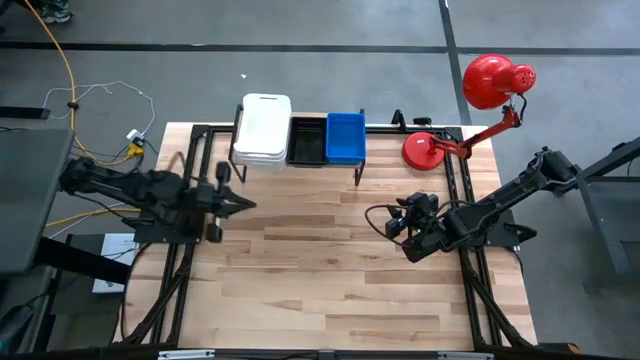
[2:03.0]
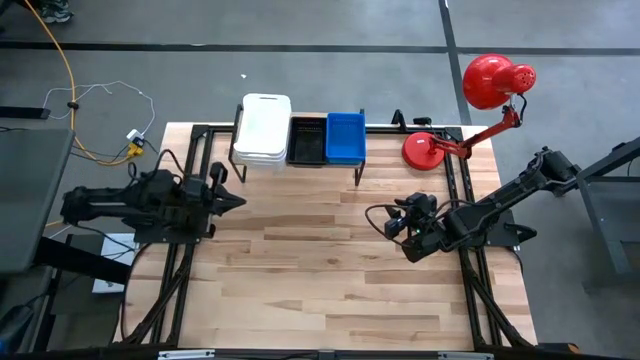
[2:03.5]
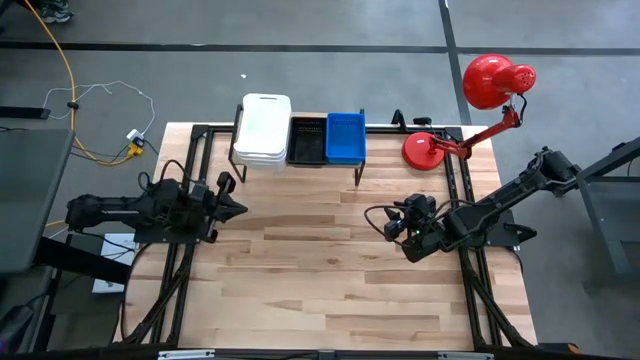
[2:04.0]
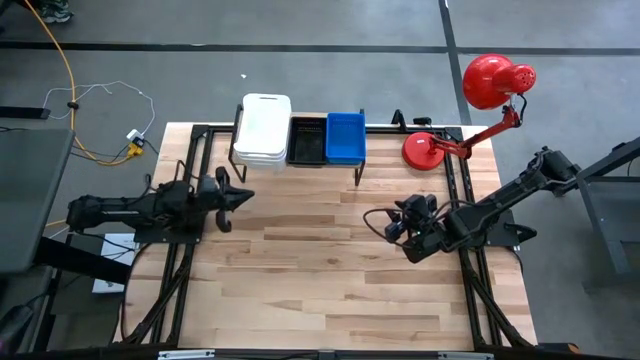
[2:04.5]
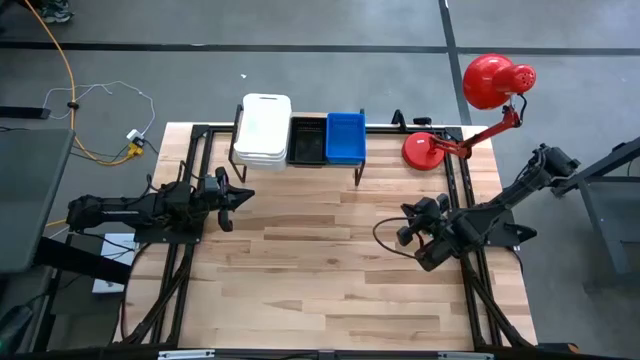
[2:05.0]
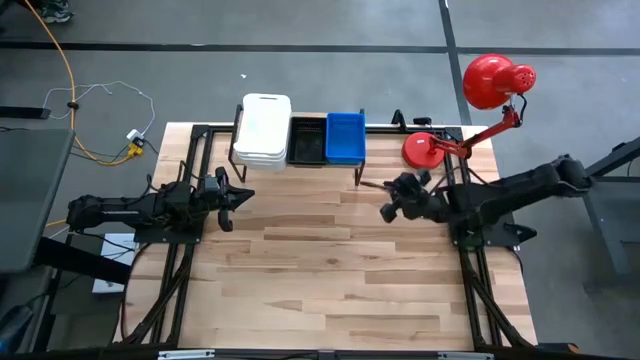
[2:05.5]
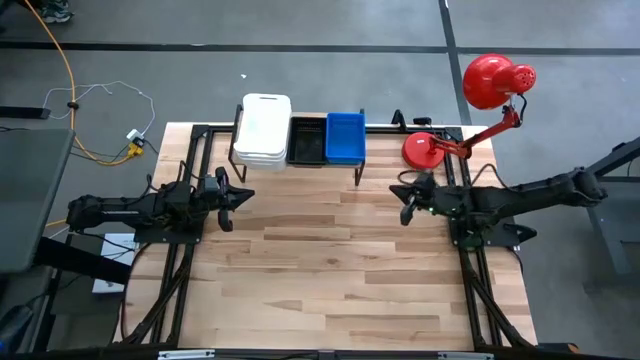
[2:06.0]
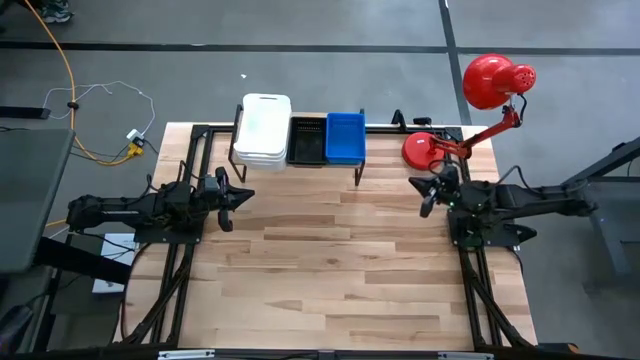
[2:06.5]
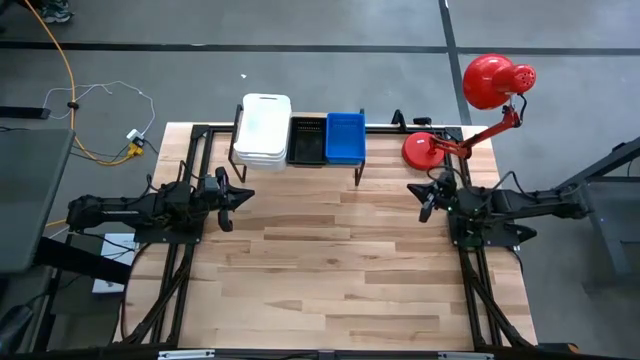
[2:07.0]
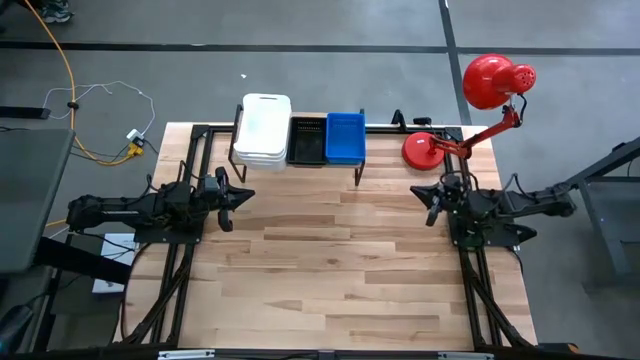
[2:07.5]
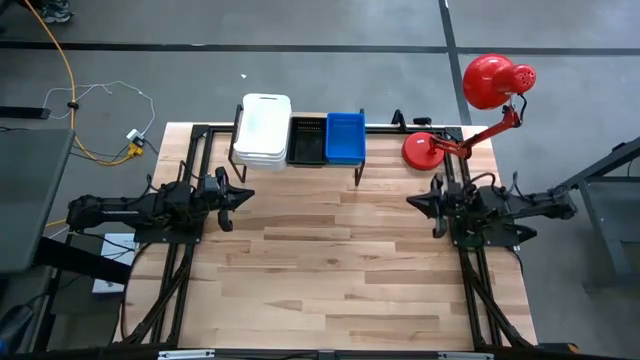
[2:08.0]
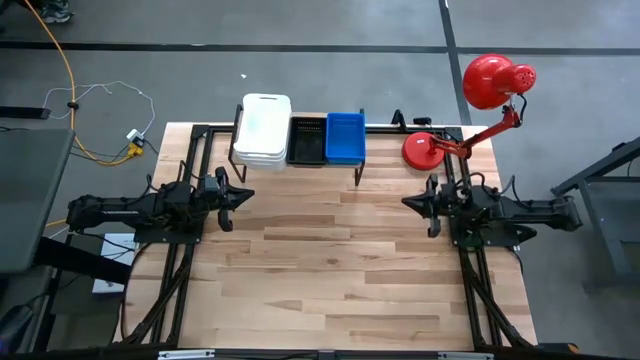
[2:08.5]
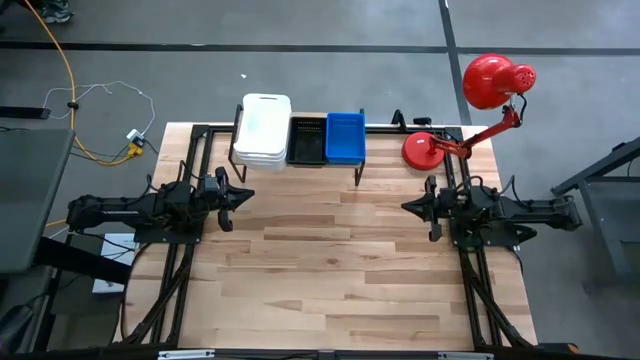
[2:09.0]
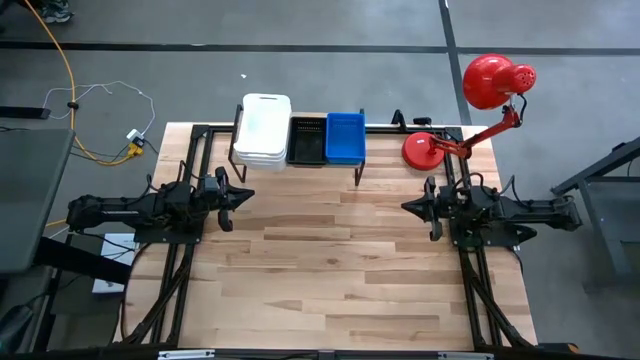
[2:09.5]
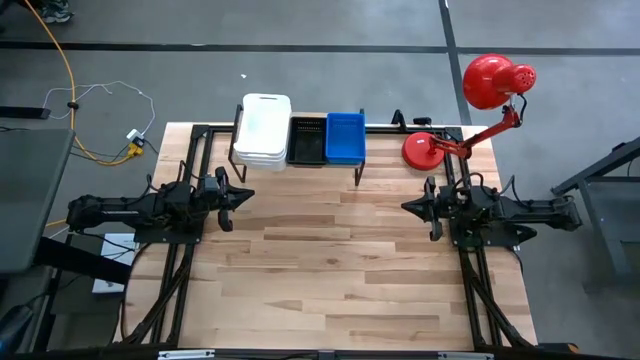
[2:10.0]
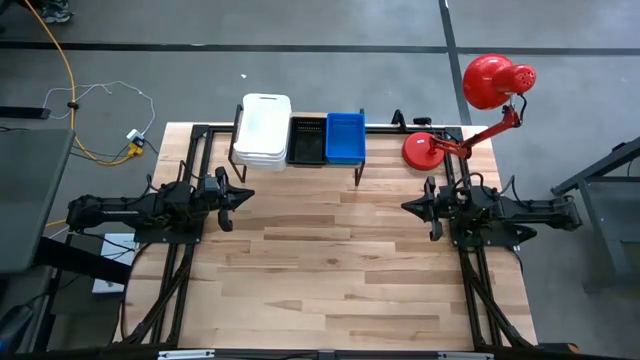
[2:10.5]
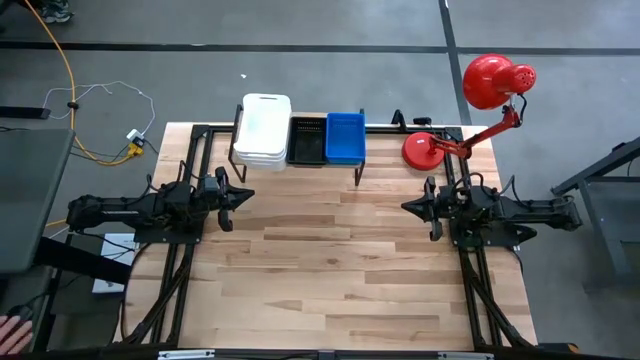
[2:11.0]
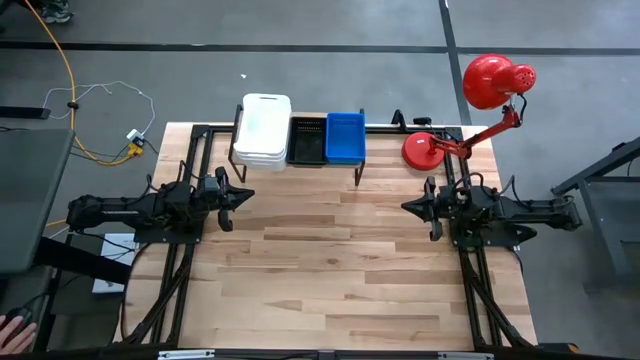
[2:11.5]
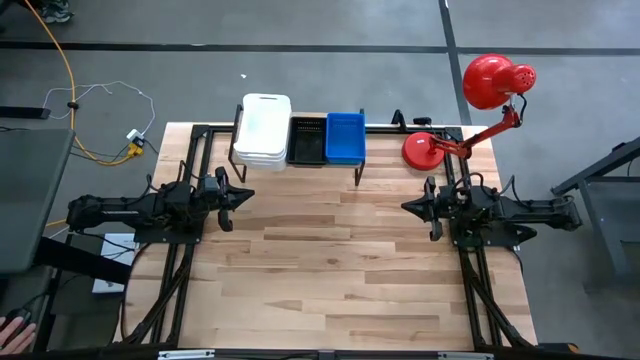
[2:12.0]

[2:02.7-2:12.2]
Task: Stack baskets on shelf by color
Return to Home Position

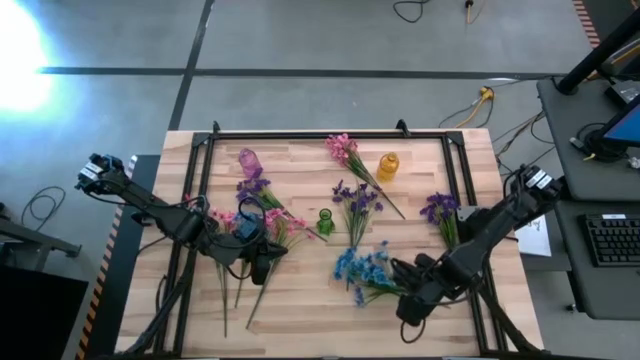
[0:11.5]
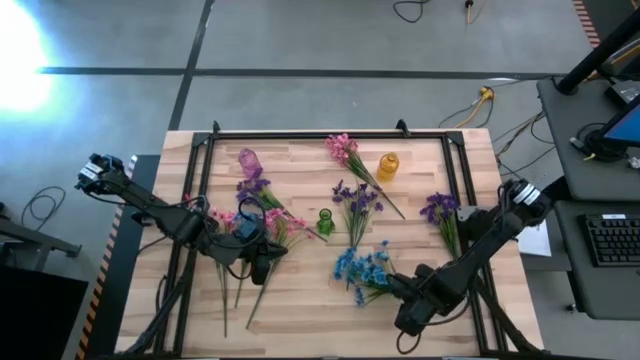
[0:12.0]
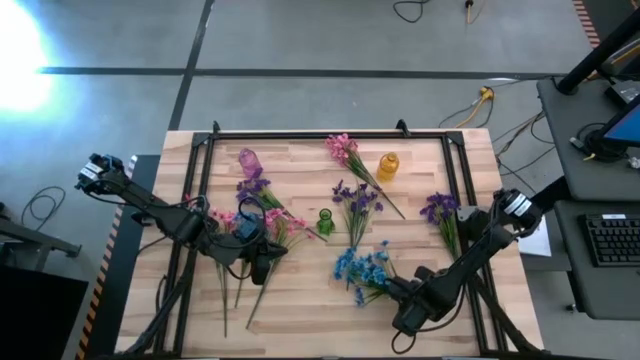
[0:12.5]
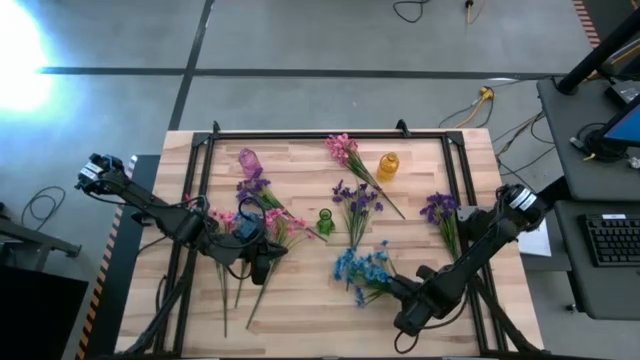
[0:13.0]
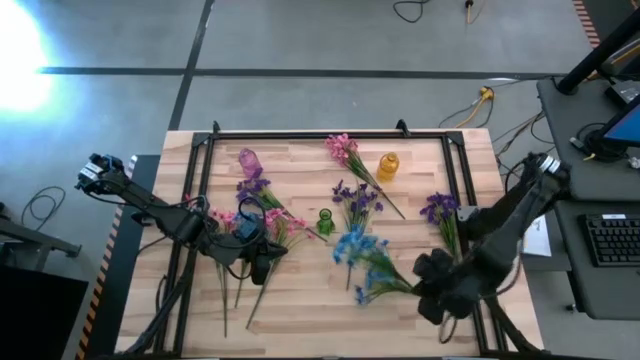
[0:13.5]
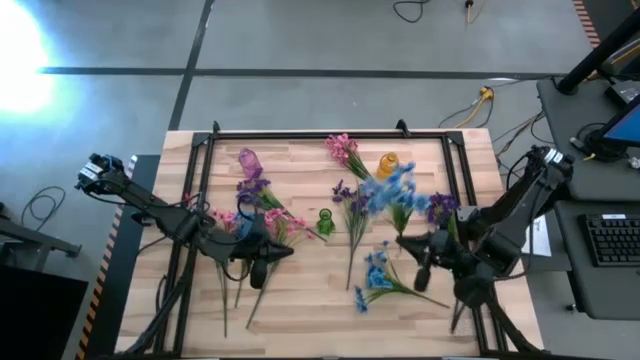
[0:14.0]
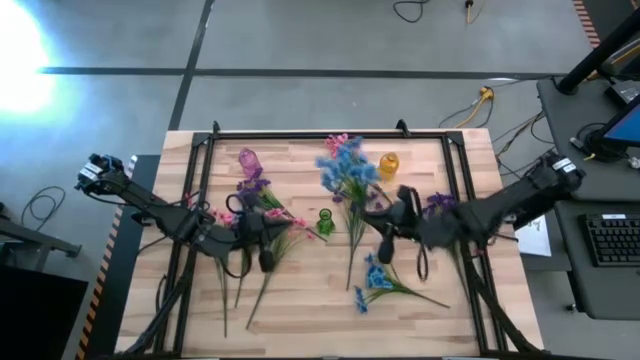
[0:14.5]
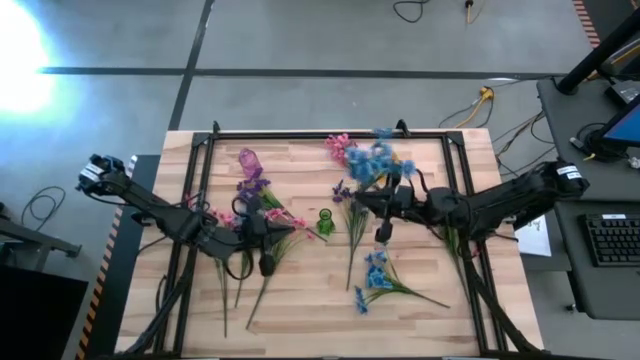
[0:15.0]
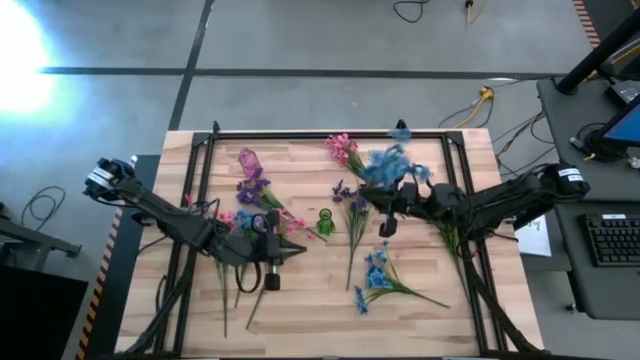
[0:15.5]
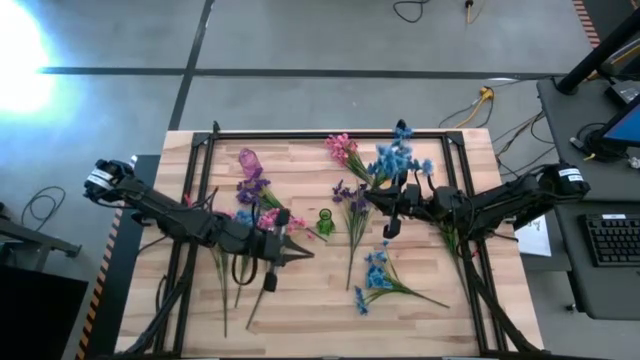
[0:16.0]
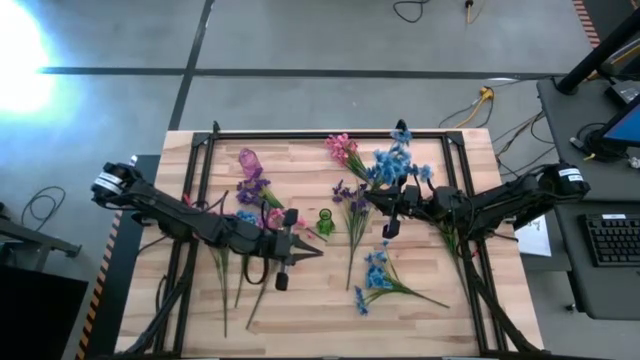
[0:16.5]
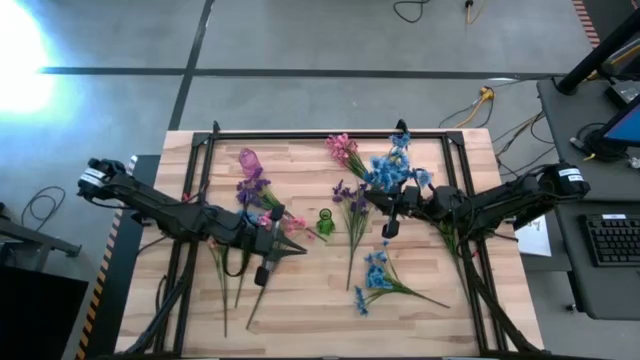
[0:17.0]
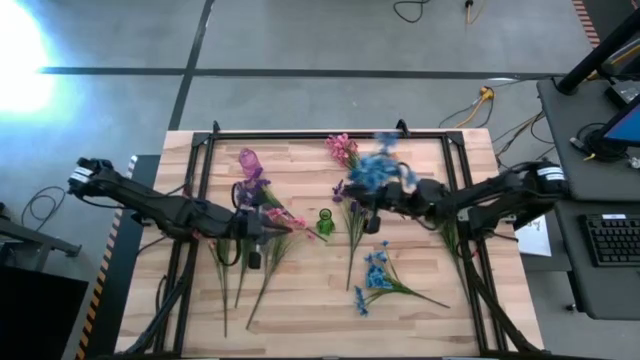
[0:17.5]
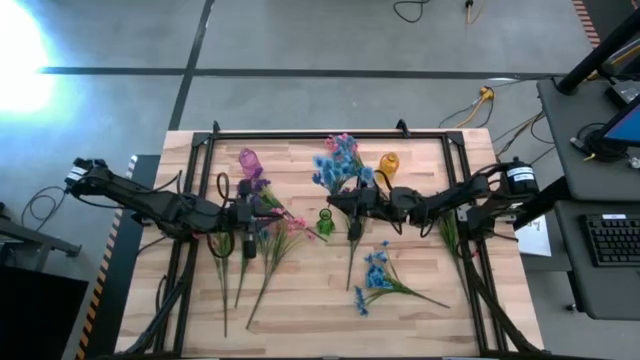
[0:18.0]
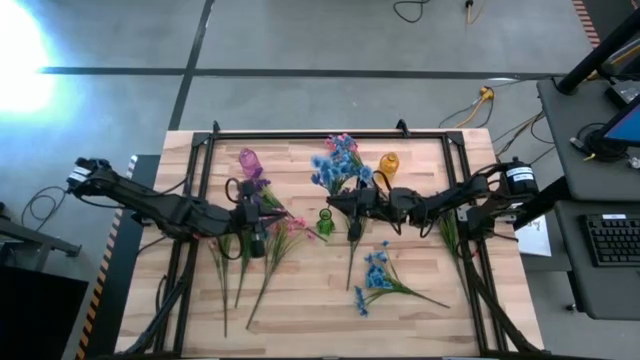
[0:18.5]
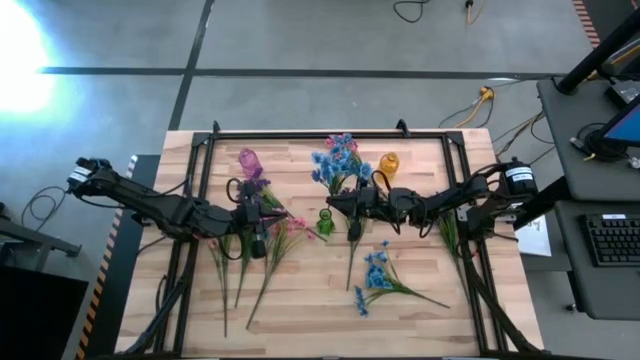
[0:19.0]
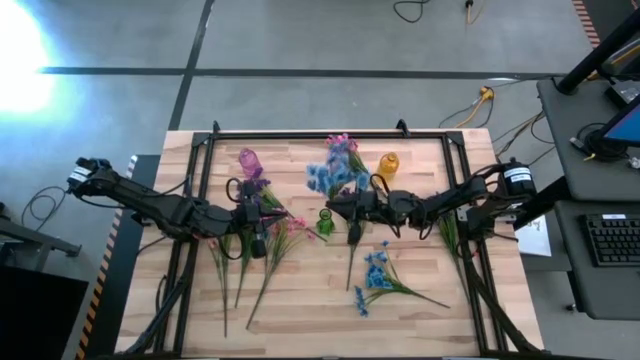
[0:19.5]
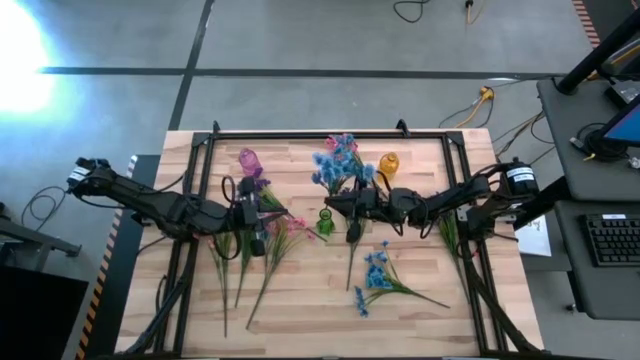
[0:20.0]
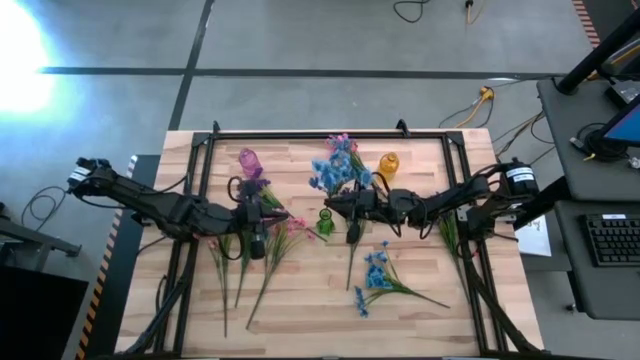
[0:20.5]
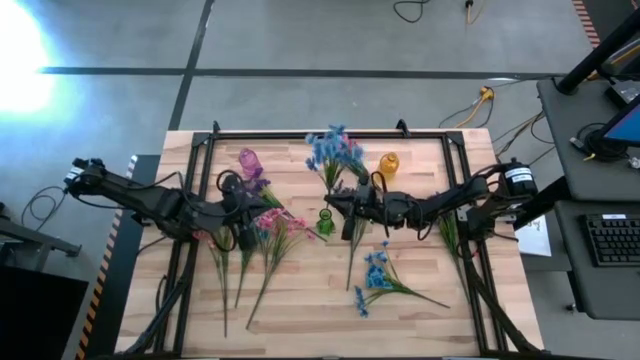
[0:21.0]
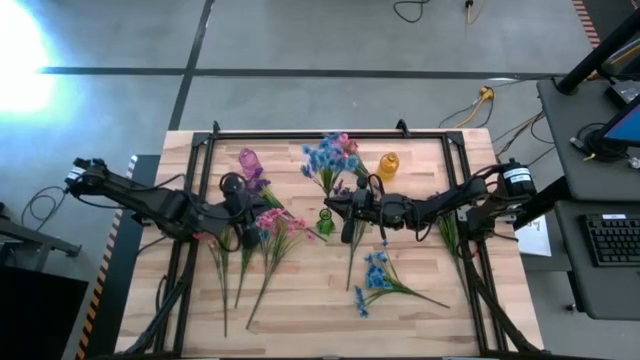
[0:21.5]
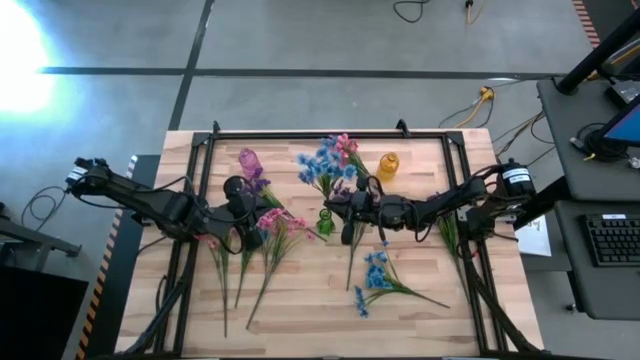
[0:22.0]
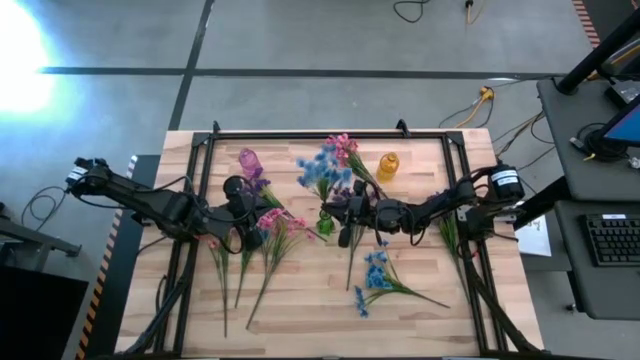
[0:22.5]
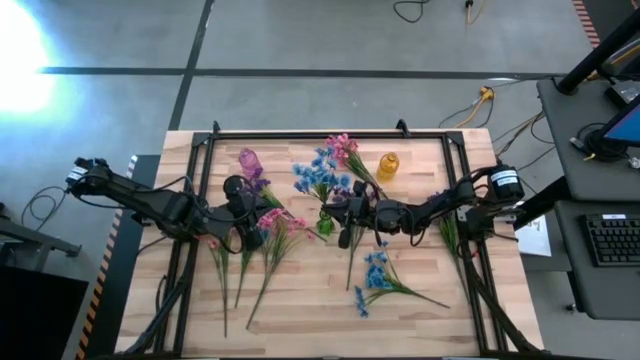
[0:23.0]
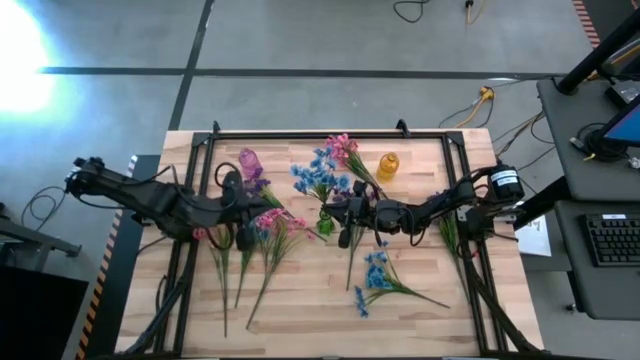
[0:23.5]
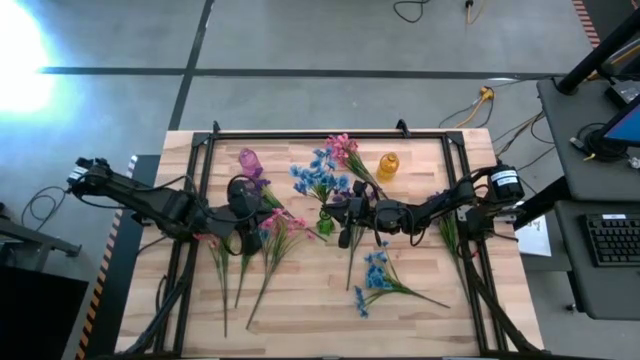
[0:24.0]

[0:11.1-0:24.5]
Task: Sort flowers into vase by color
Put the bottom blue flowers into the green vase
